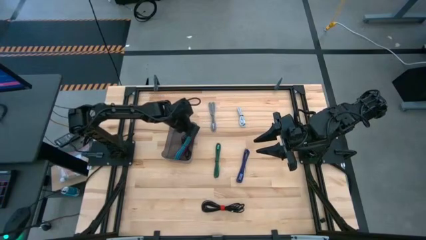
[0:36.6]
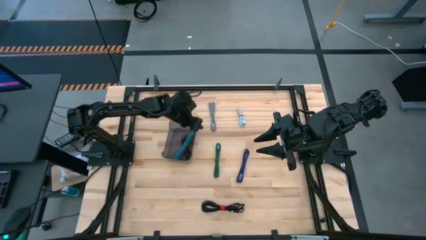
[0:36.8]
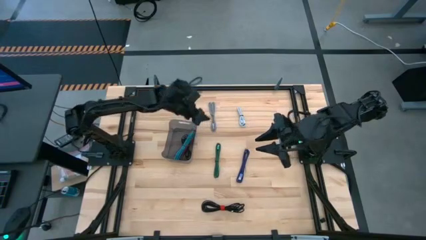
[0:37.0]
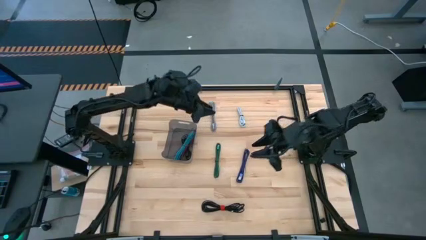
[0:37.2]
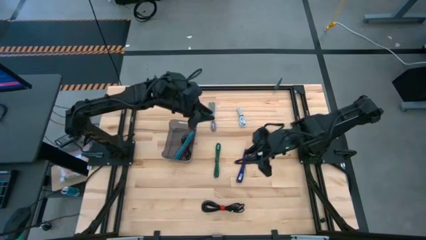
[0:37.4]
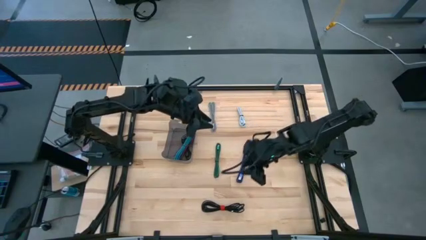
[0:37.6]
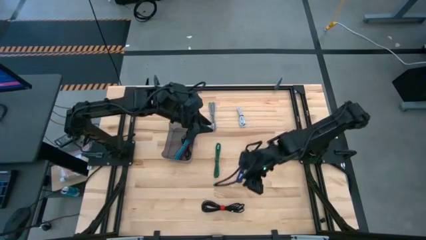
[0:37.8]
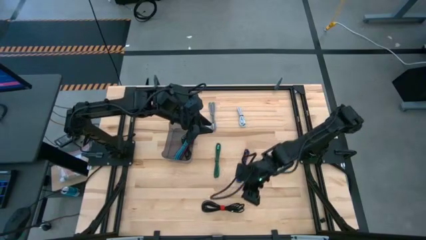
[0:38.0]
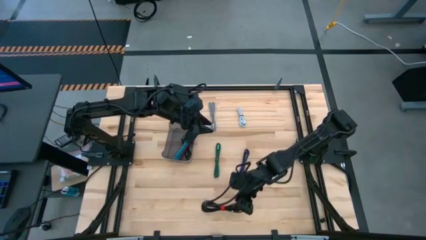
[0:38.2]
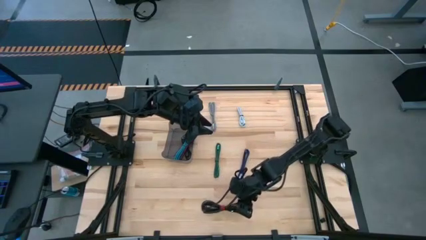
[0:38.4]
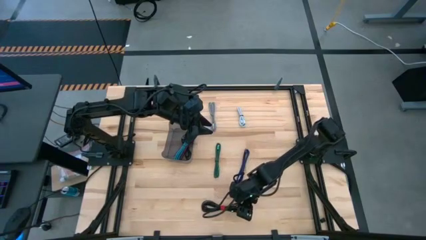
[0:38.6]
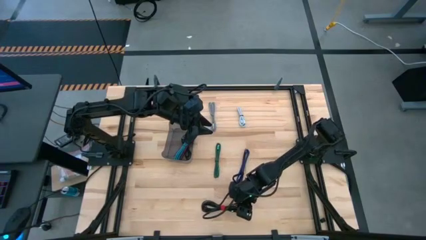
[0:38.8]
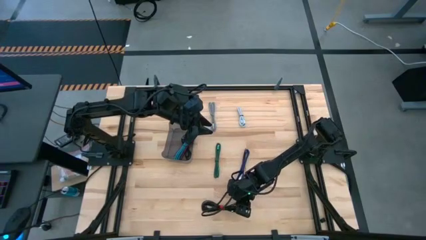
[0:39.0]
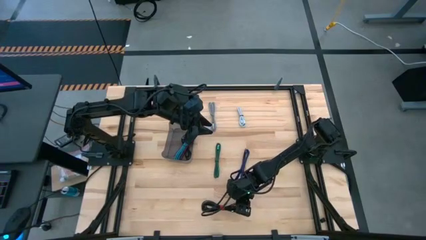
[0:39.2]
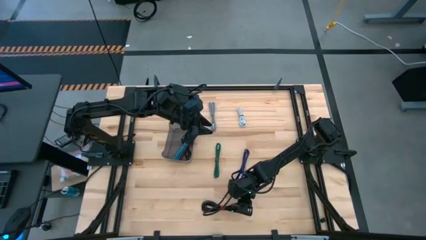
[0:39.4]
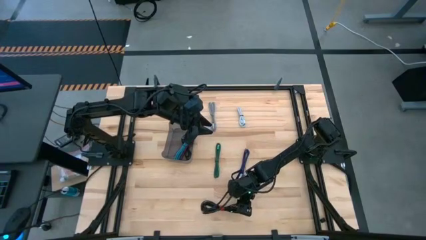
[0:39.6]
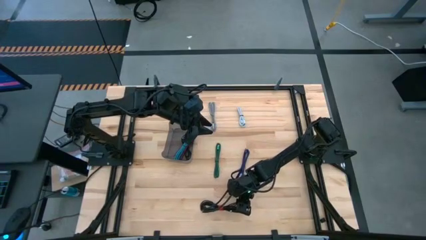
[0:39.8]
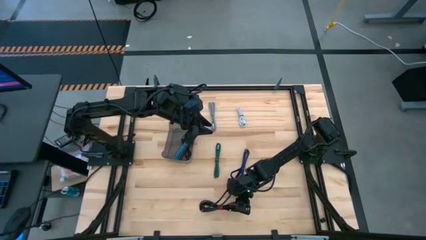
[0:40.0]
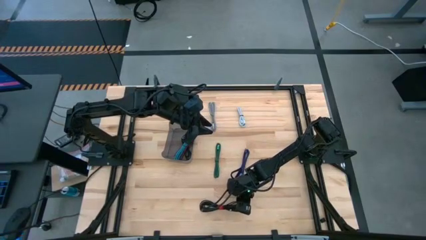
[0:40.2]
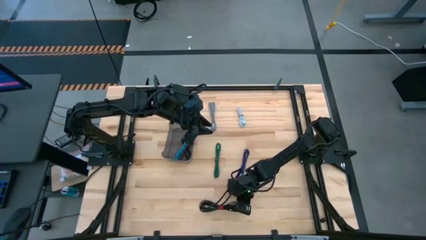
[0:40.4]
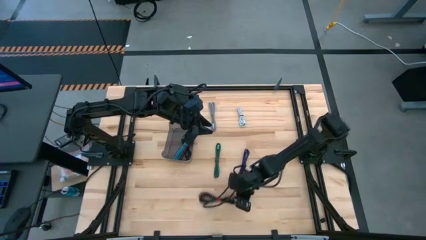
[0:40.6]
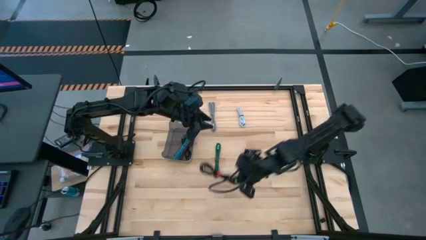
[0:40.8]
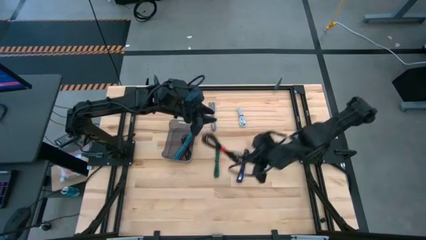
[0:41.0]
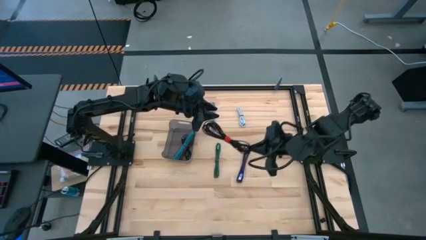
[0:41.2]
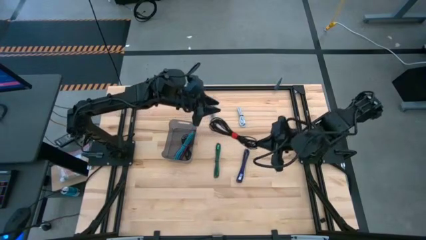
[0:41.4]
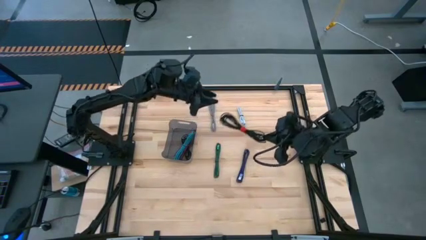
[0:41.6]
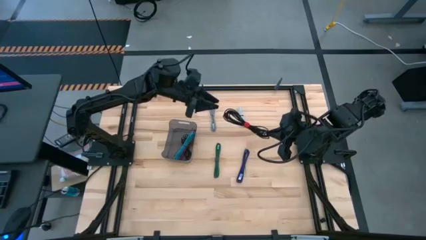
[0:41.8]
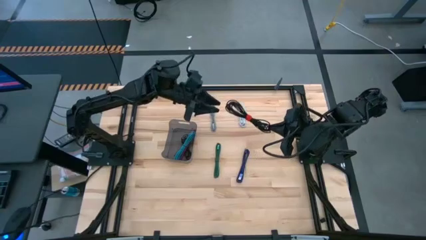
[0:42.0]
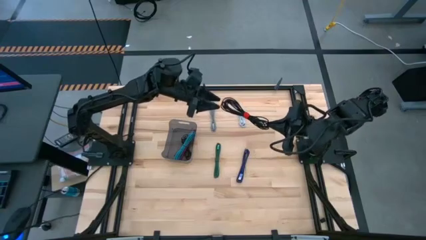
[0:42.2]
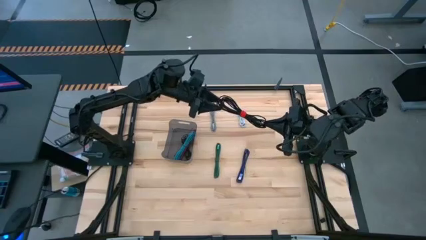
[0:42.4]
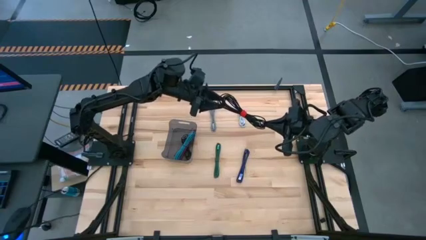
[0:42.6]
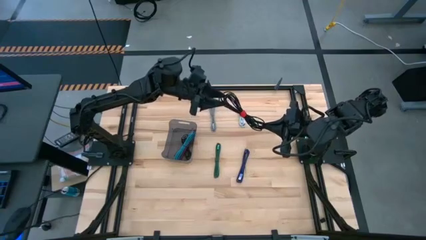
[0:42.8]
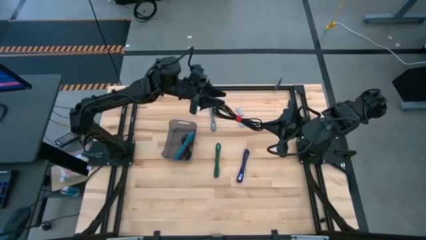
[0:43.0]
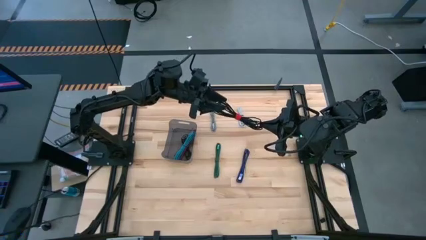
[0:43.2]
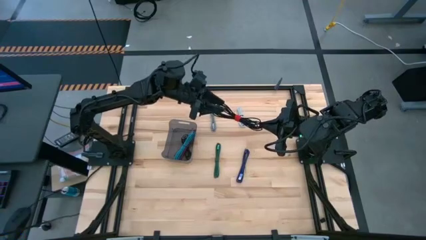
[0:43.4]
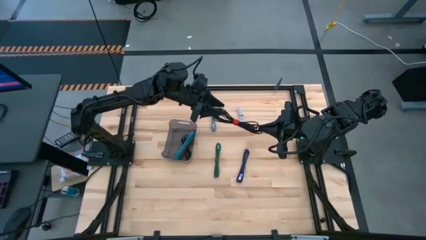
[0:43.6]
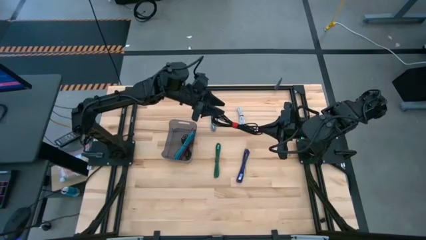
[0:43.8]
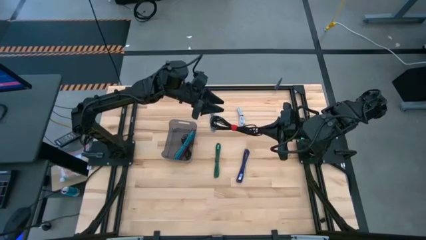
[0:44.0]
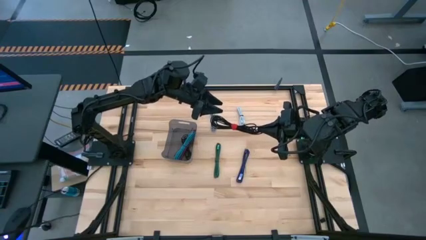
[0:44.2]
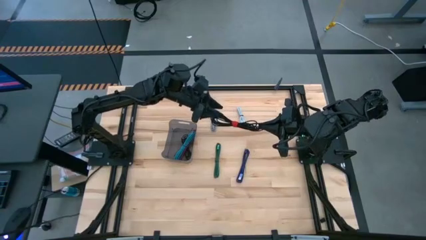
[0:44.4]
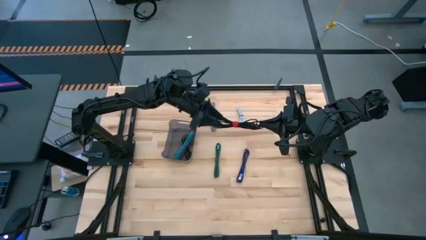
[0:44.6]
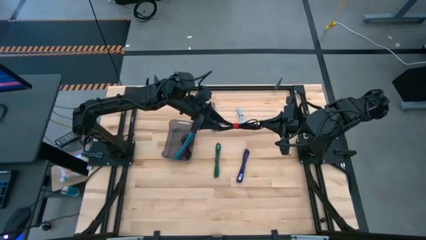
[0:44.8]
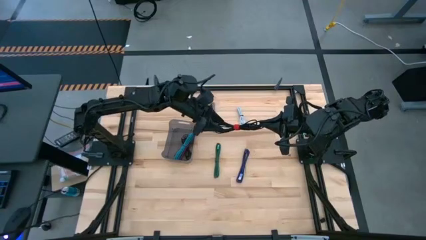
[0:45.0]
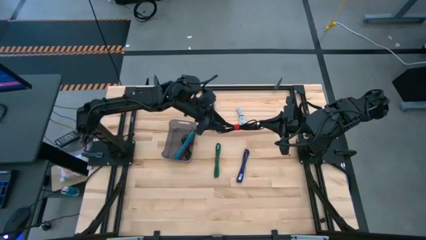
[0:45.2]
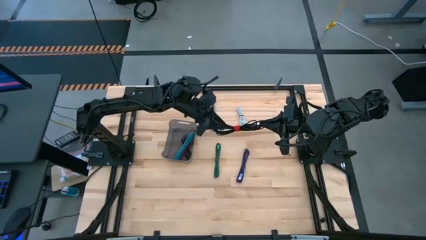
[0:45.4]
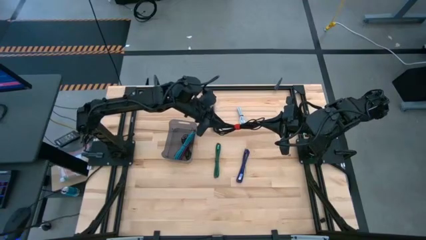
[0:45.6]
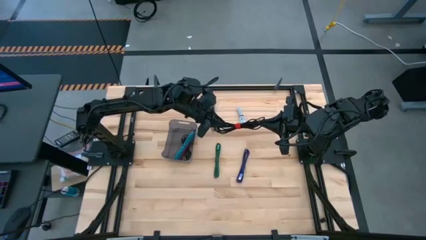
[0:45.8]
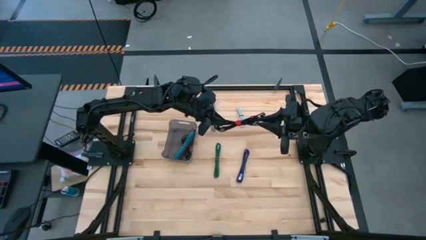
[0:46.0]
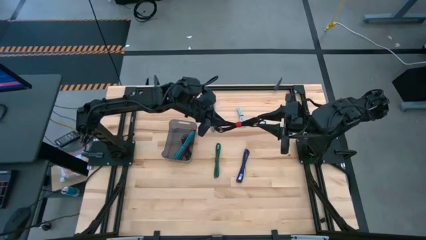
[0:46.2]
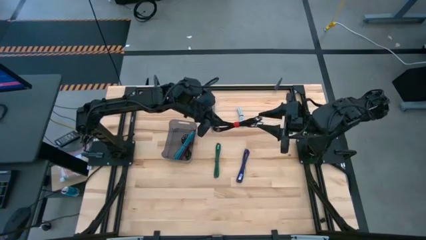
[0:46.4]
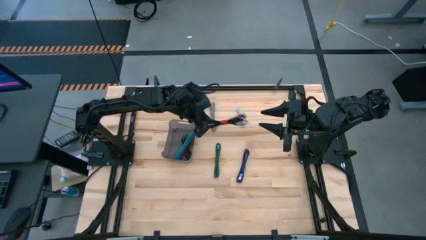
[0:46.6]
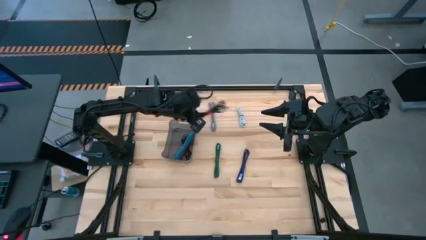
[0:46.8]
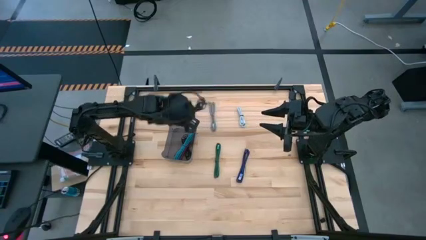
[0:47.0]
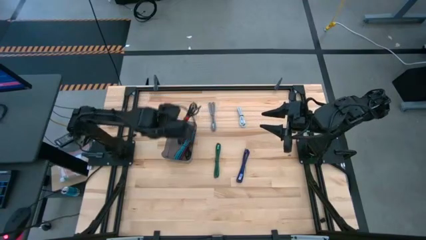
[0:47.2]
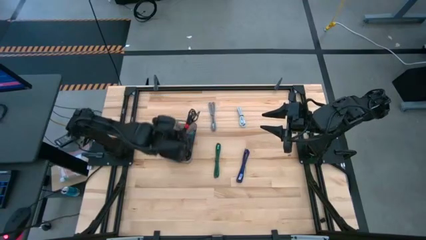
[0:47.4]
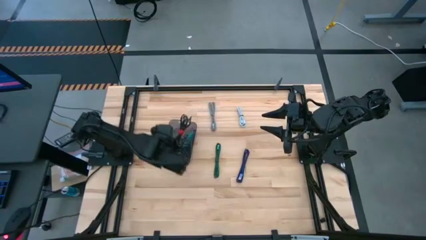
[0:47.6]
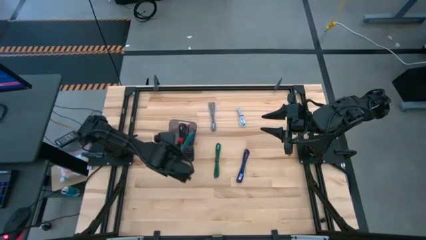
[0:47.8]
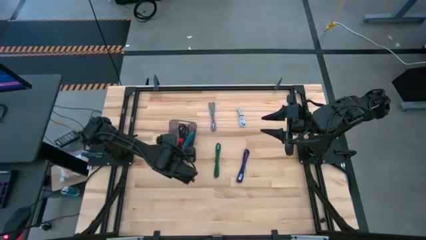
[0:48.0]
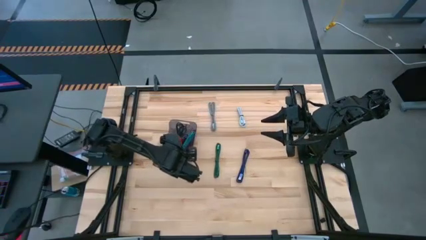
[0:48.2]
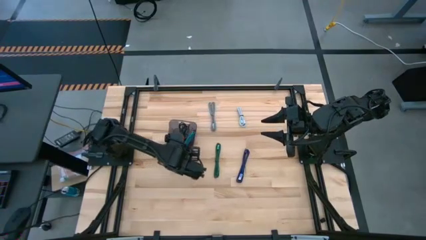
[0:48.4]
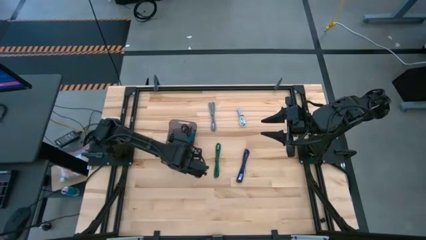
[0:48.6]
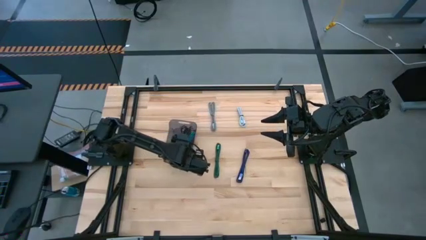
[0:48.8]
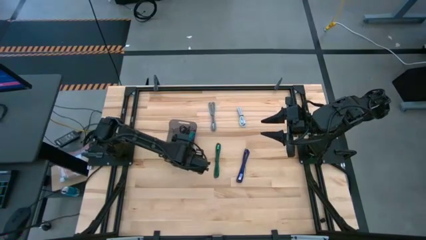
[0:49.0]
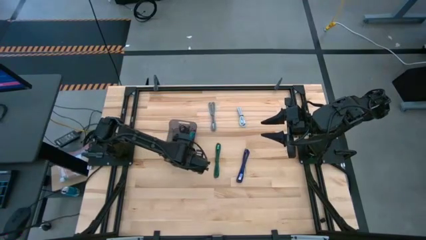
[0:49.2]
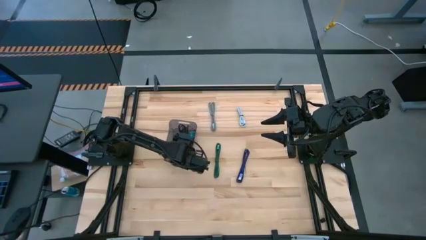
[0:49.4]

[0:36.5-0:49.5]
Task: Pick and place USB-C Cables
Put the black USB cable into the black bin
